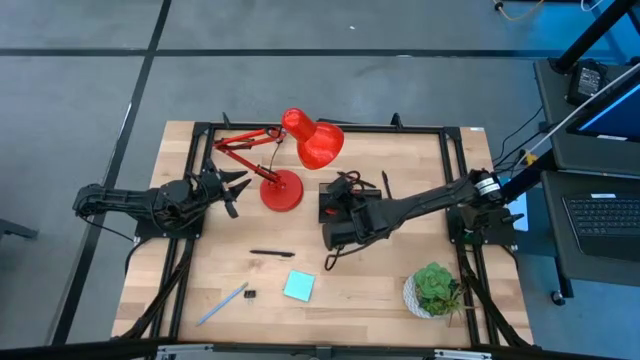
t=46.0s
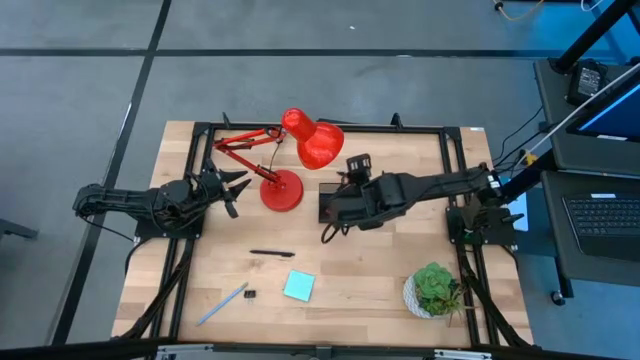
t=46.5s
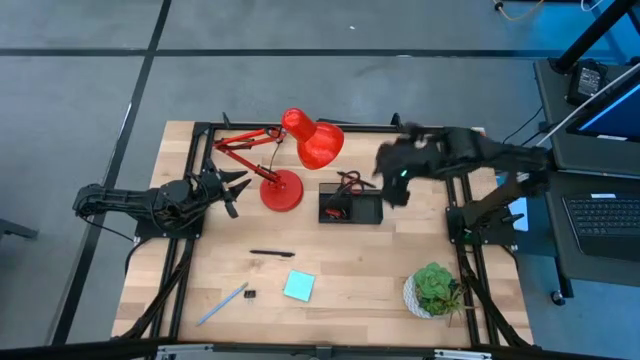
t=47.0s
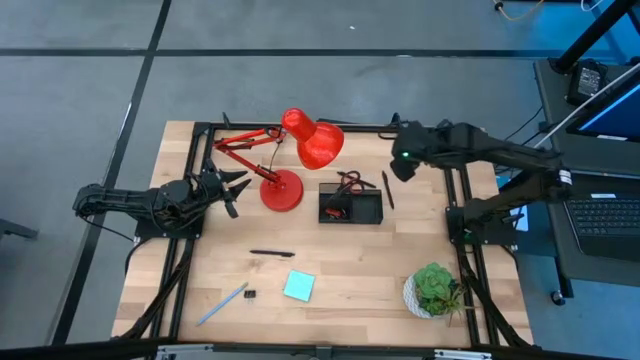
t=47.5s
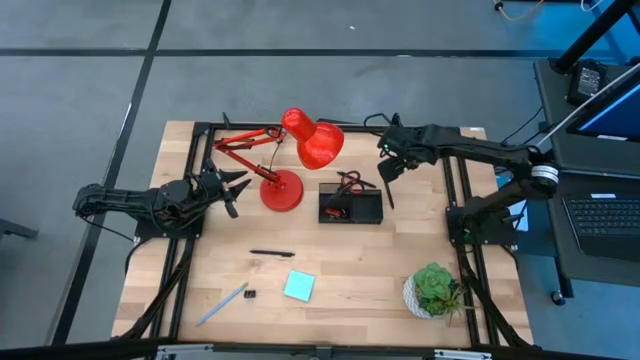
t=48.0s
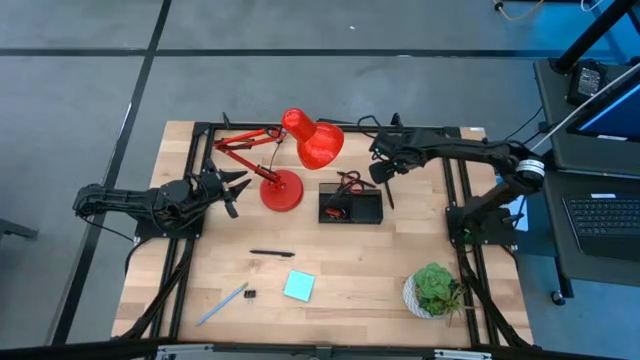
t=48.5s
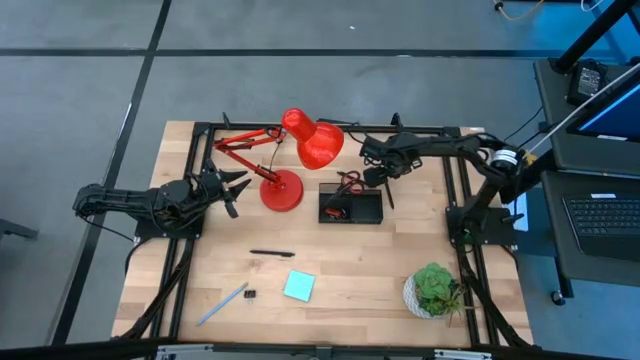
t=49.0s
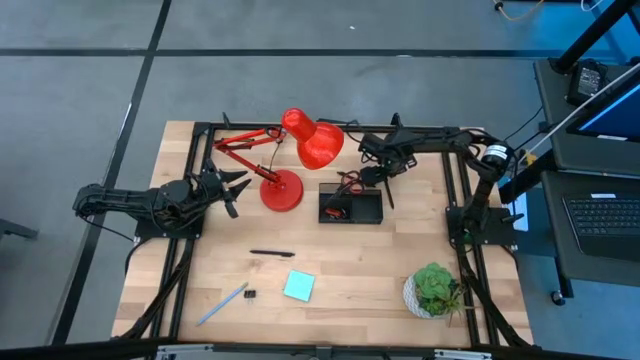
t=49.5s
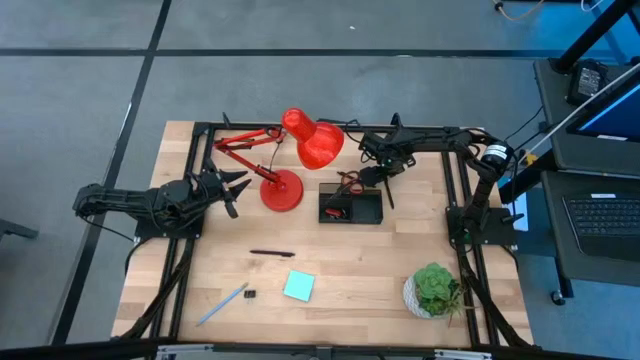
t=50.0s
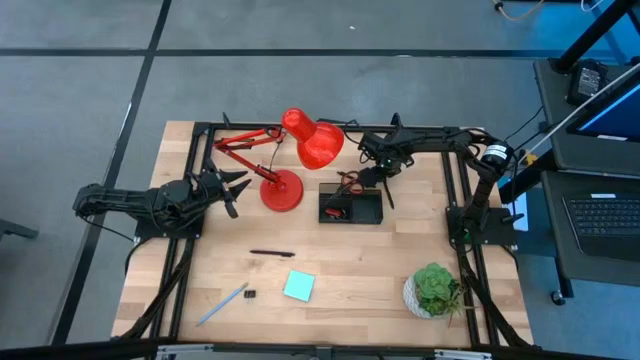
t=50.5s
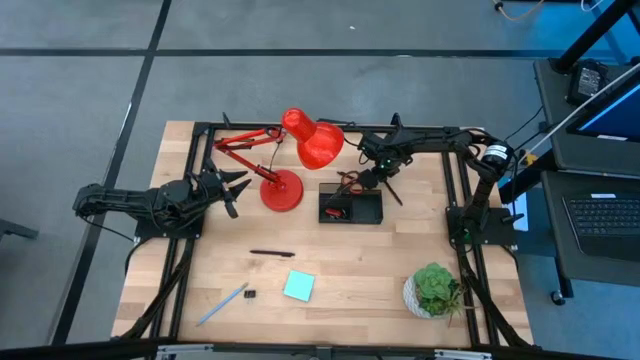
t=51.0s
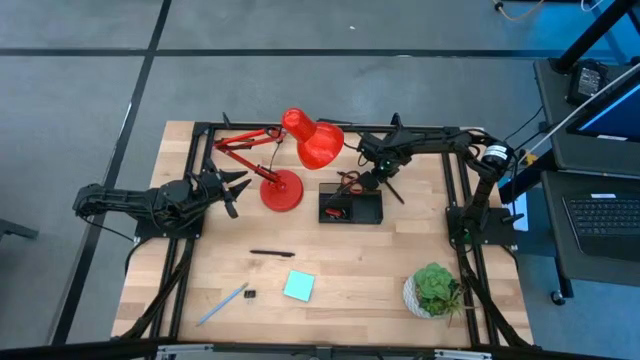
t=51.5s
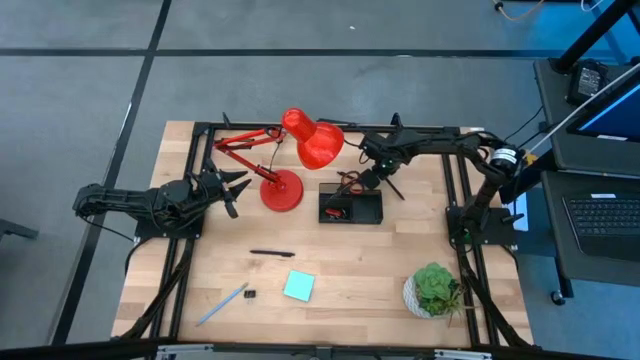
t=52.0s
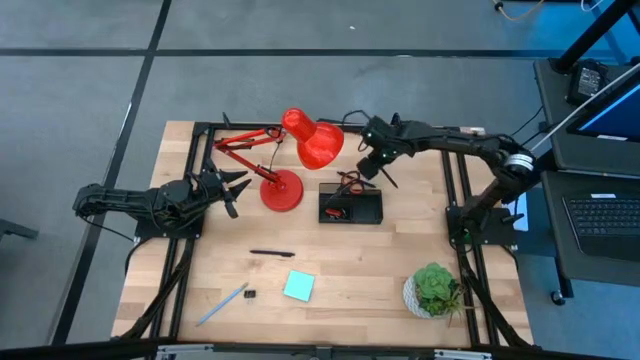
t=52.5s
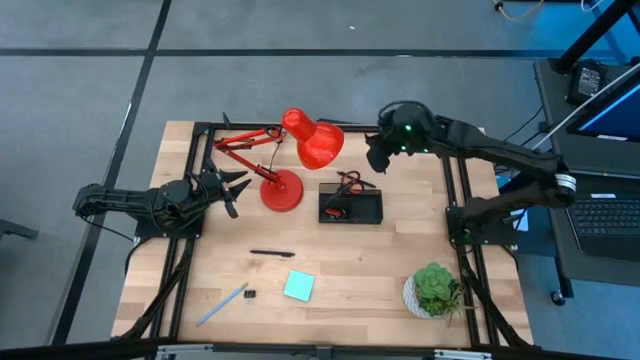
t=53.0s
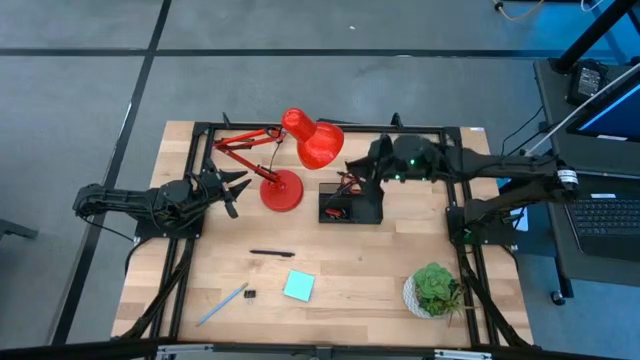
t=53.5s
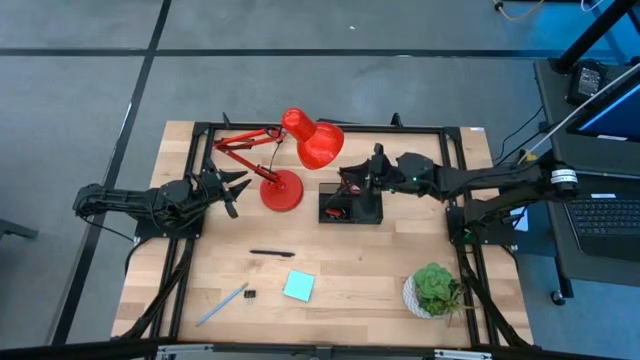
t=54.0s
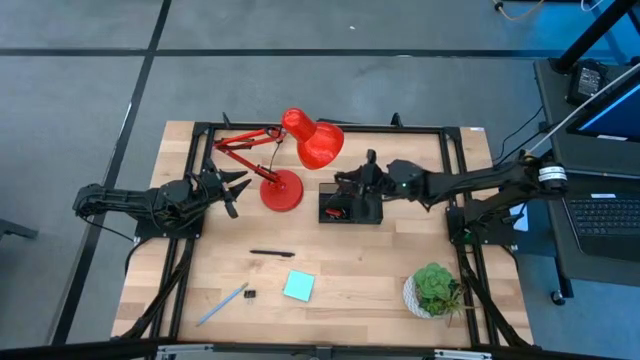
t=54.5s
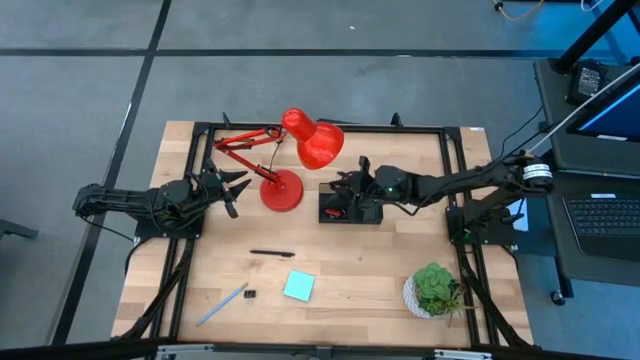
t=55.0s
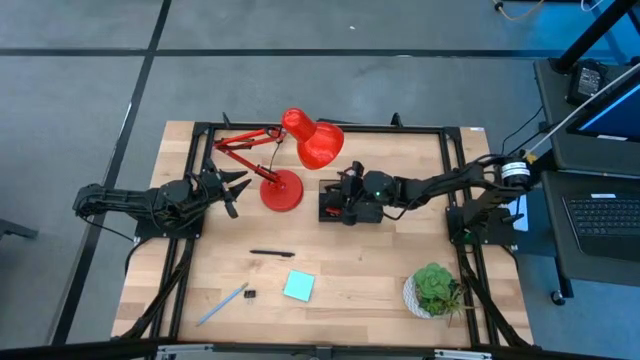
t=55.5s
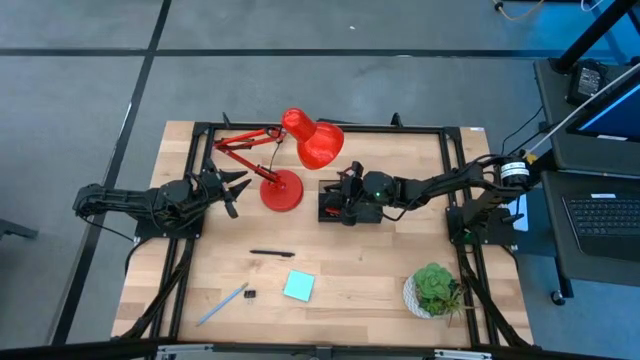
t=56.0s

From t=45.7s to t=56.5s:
Task: Pick and place office supplies into organizer
Put the top right black pen into the black desk organizer

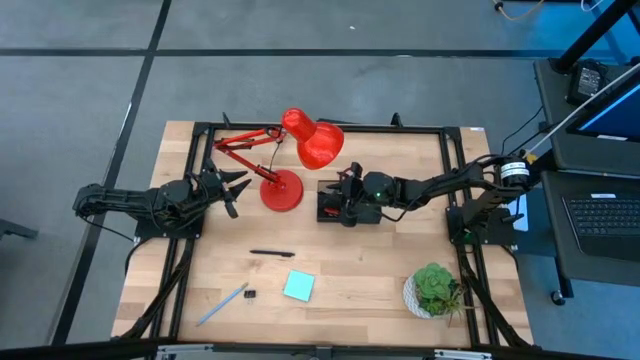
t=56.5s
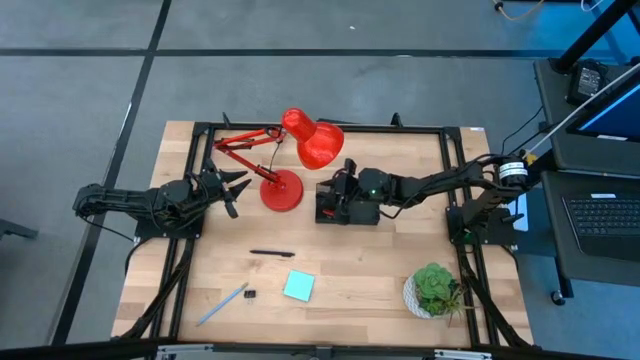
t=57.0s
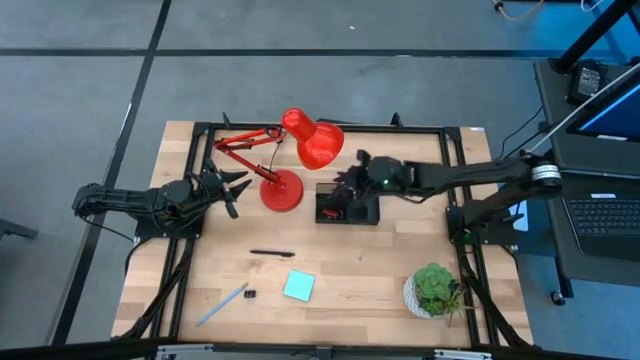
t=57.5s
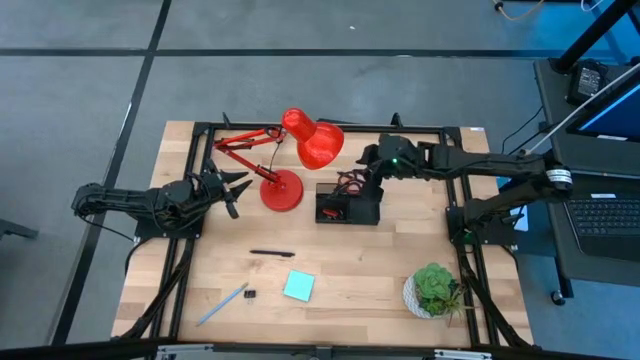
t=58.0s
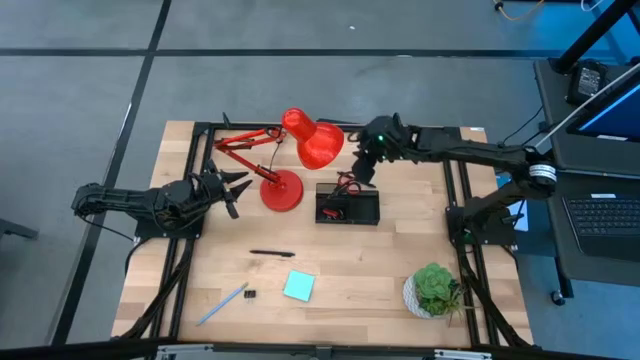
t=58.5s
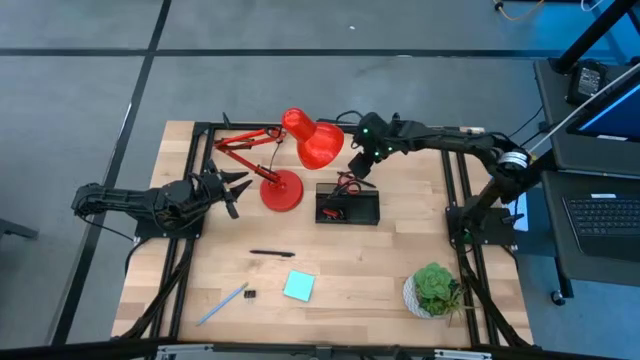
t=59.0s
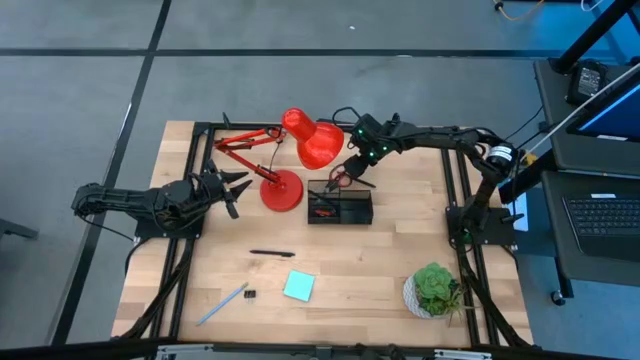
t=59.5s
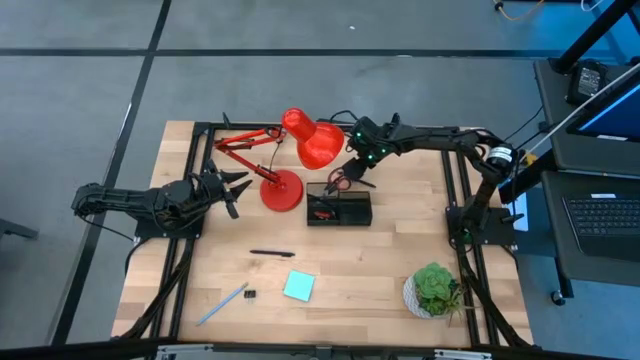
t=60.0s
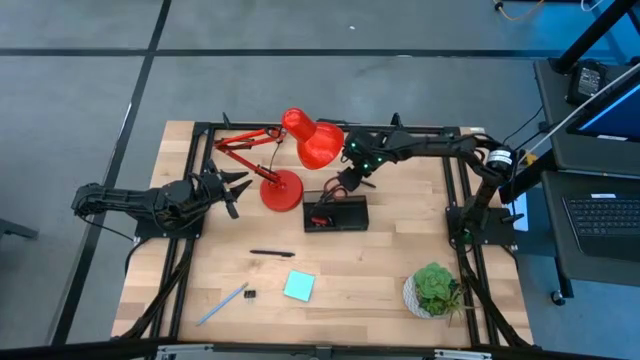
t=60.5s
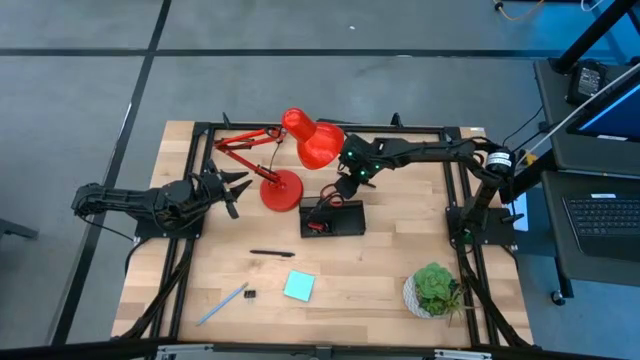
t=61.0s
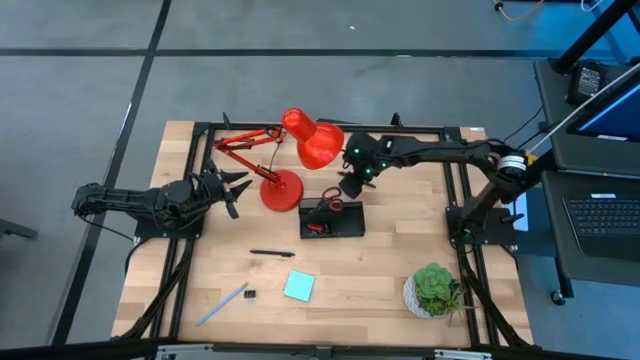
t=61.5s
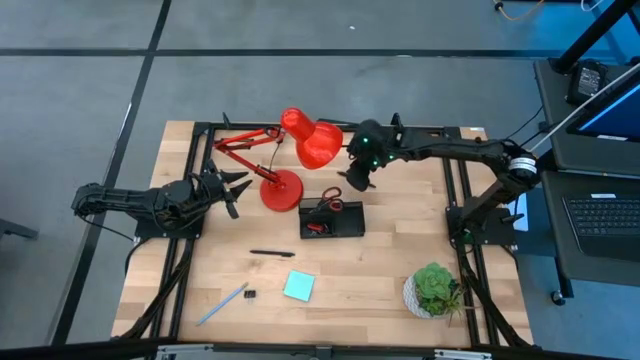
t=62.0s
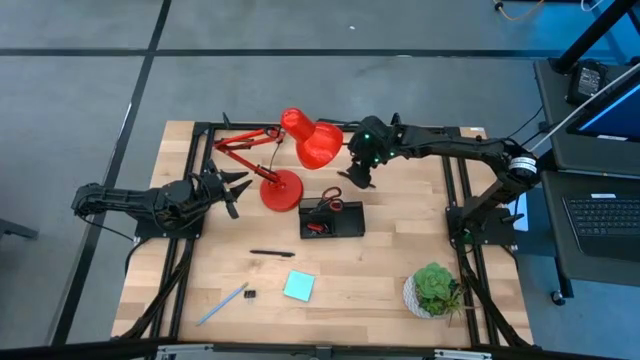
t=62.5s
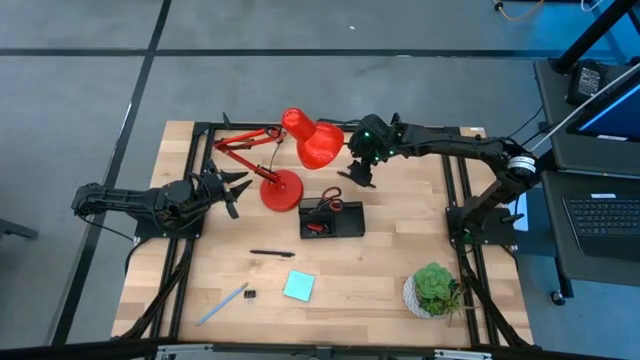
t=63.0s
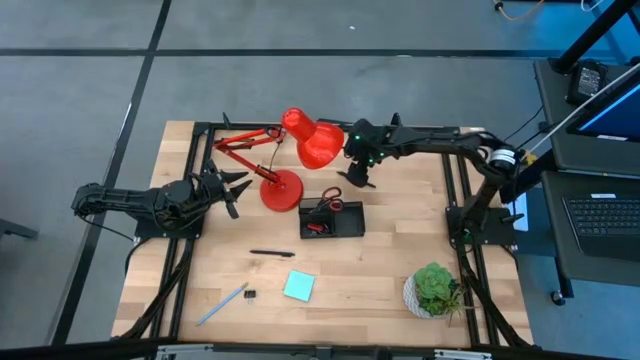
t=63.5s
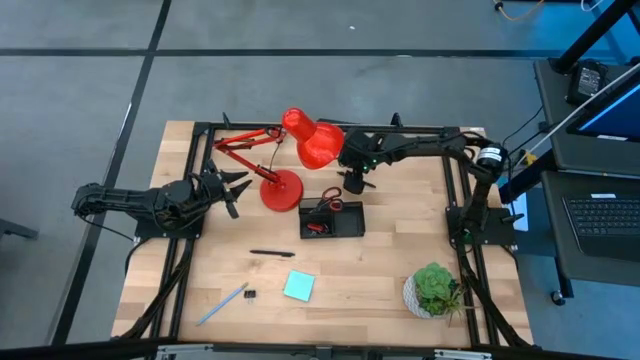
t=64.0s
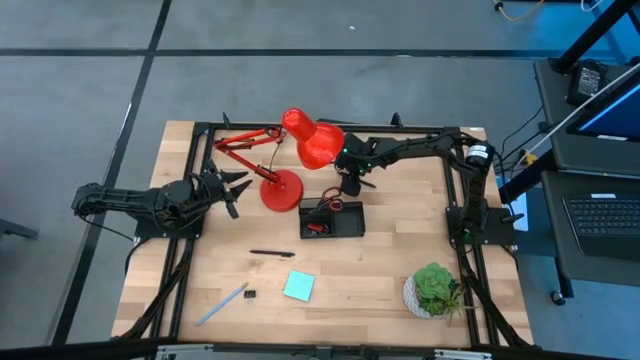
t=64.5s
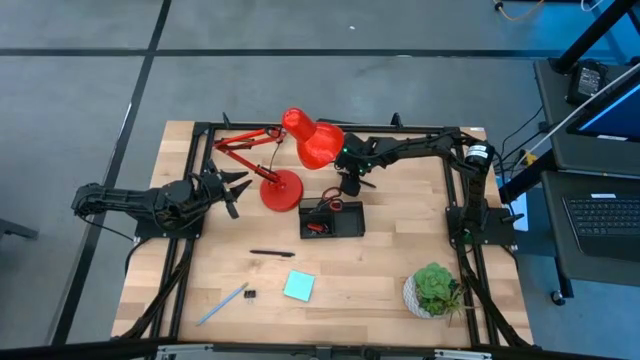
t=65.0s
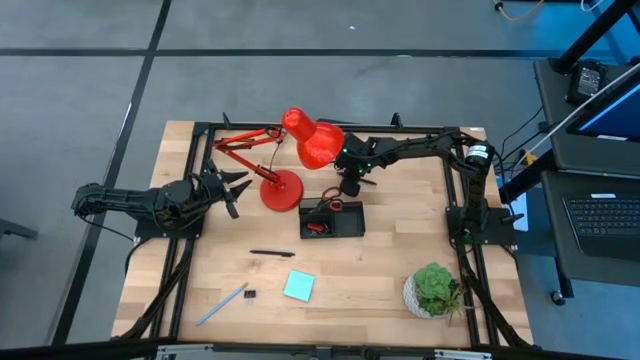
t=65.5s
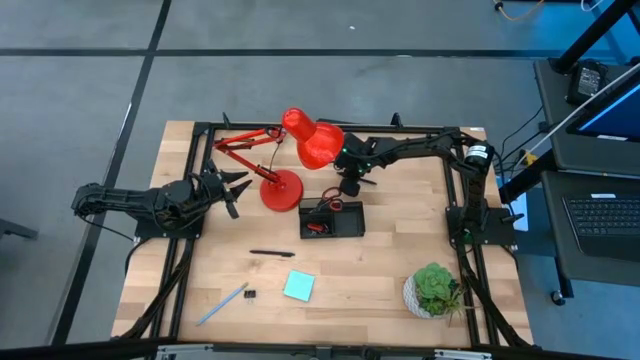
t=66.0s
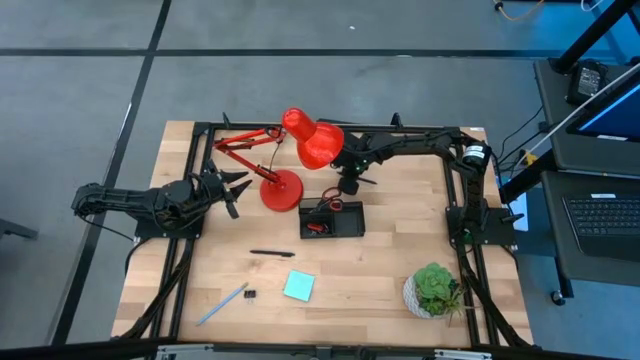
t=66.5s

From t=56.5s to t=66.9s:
Put the top black pen into the black desk organizer

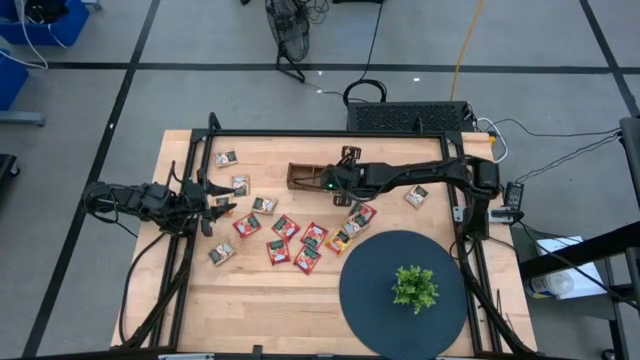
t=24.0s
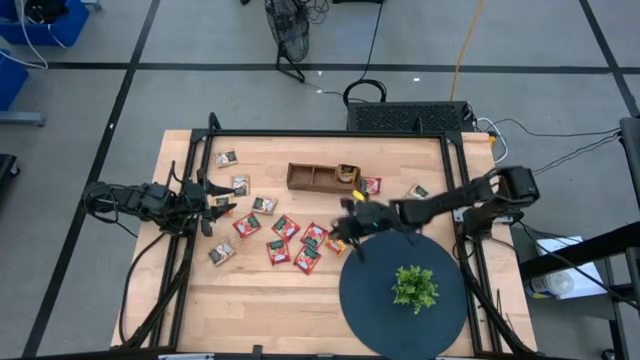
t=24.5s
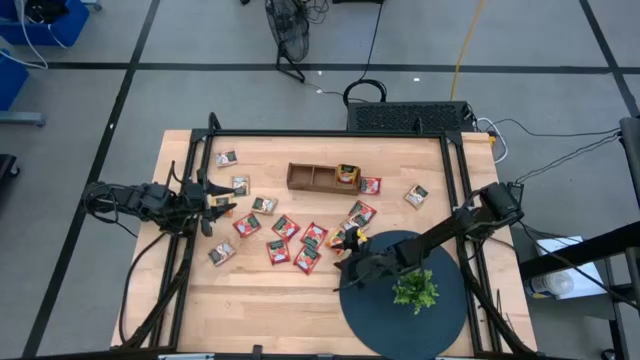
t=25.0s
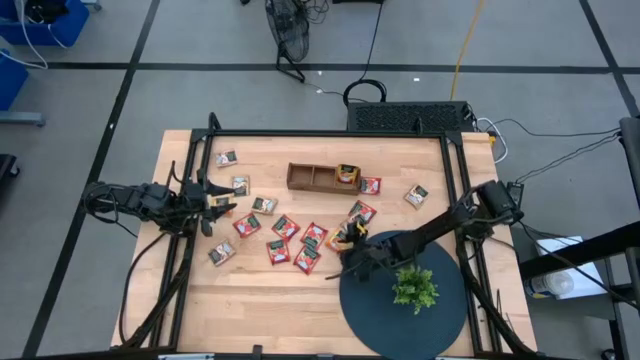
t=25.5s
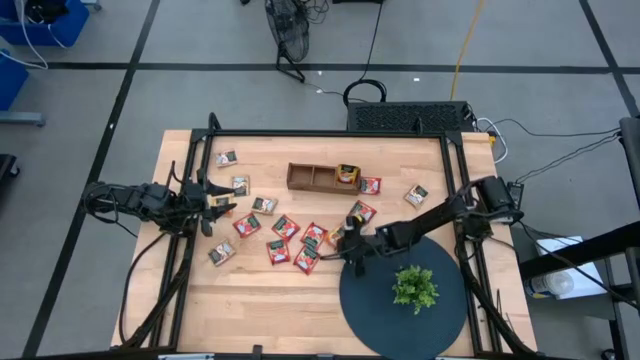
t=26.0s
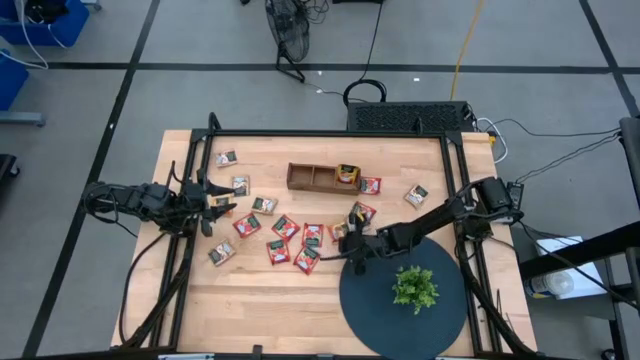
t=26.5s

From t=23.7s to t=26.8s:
Task: Pick & Place Tea
Put the yellow tea bag into the right section wooden organizer
